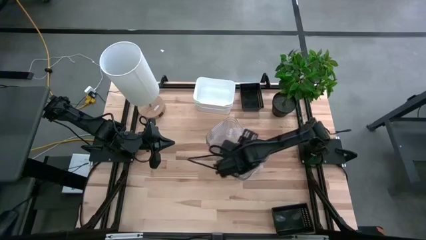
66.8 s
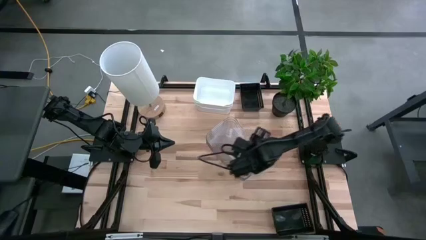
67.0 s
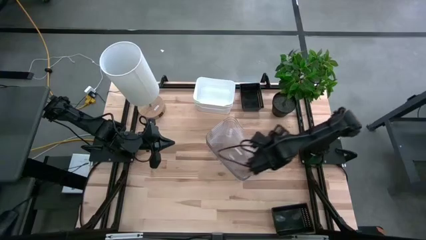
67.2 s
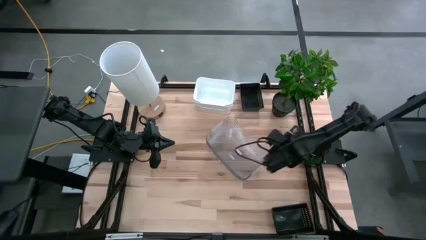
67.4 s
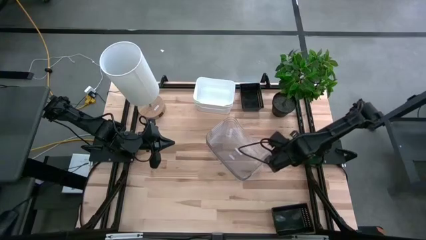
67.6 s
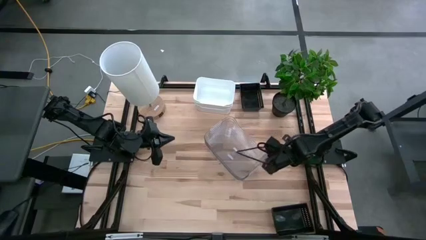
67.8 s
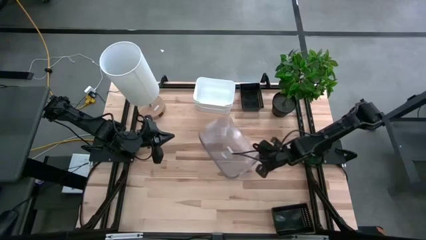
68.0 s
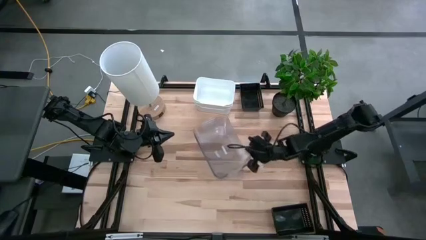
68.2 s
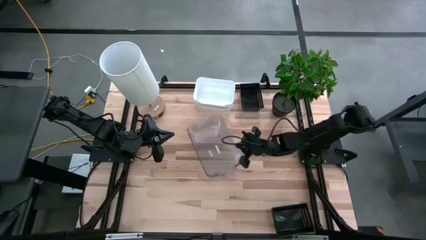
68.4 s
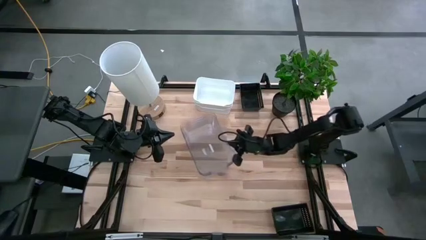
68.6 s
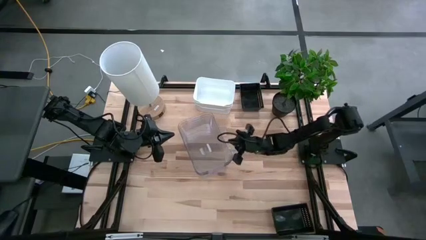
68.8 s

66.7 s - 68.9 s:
Adjust the stacked transparent bins on the table

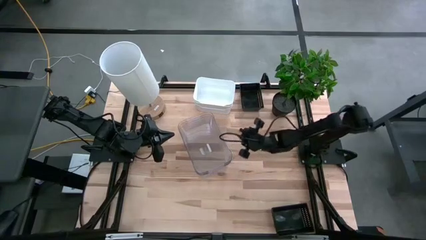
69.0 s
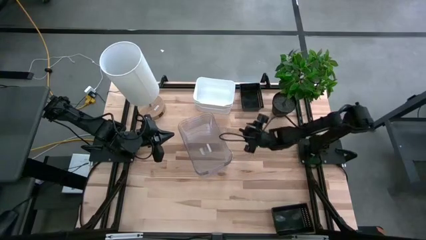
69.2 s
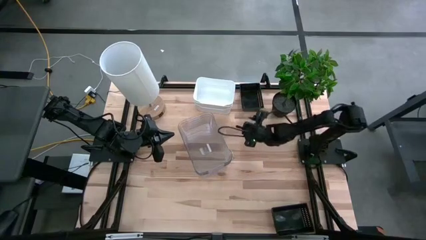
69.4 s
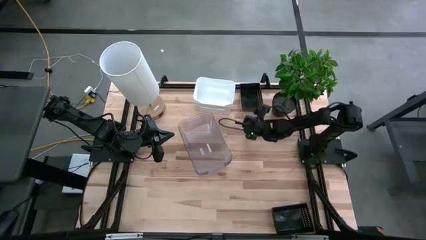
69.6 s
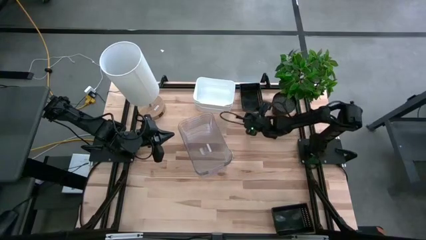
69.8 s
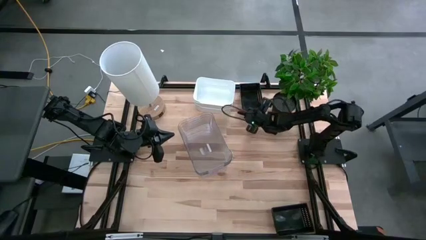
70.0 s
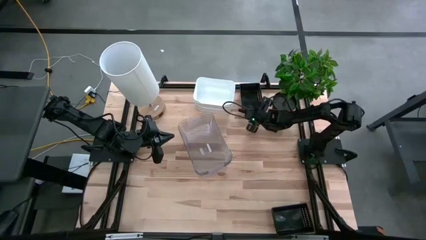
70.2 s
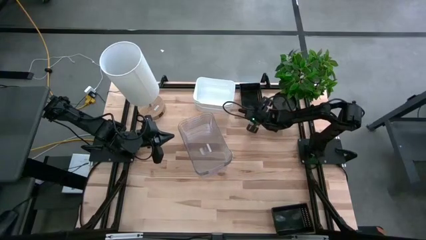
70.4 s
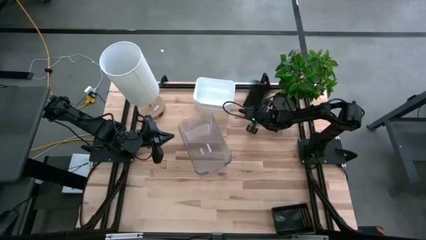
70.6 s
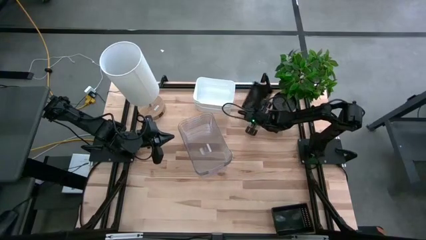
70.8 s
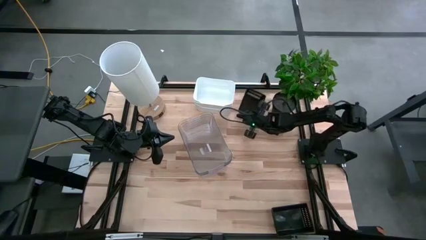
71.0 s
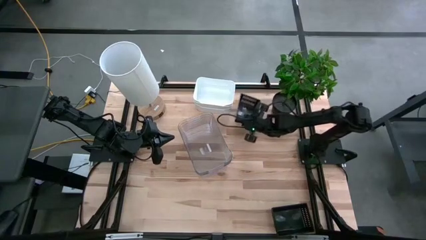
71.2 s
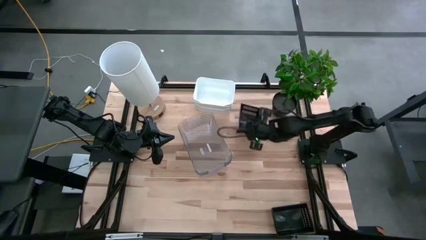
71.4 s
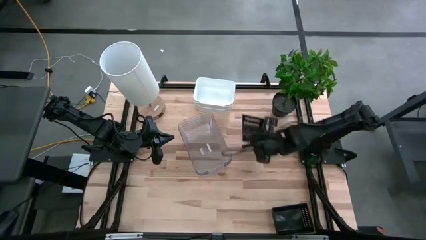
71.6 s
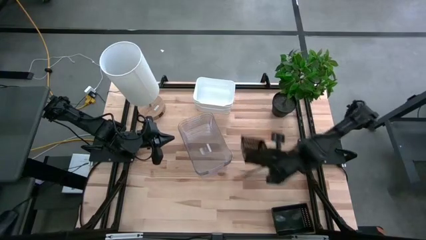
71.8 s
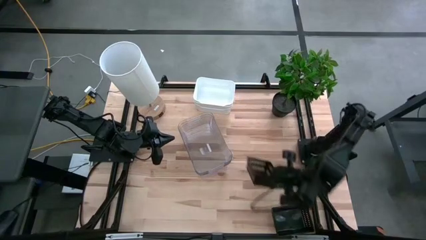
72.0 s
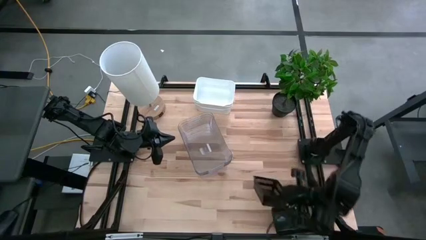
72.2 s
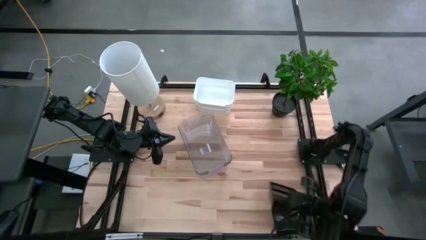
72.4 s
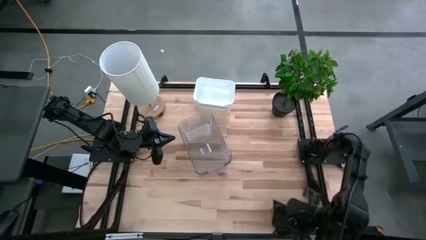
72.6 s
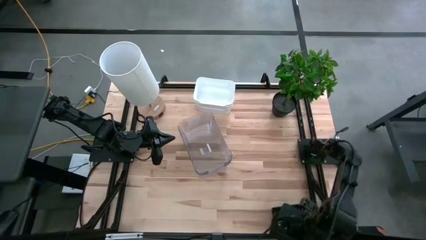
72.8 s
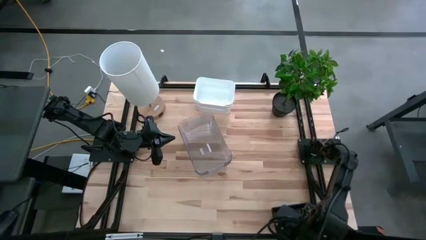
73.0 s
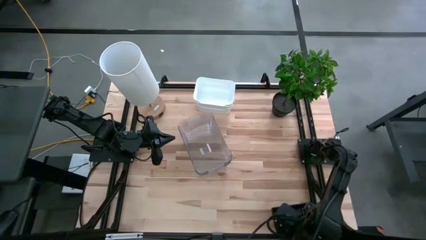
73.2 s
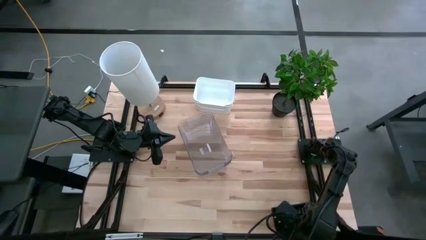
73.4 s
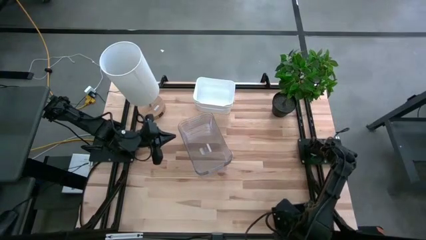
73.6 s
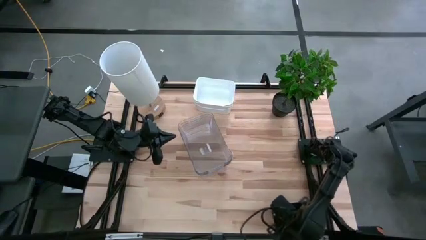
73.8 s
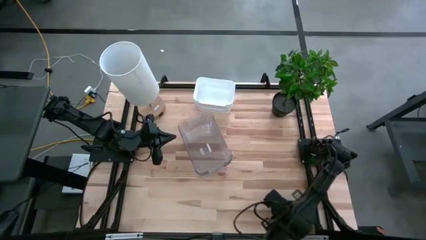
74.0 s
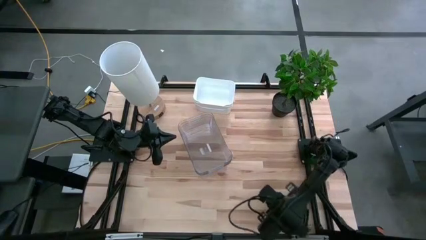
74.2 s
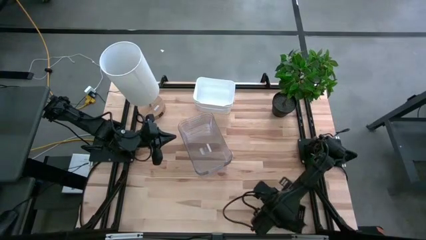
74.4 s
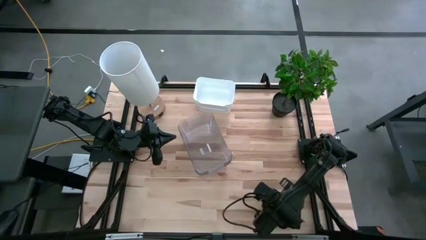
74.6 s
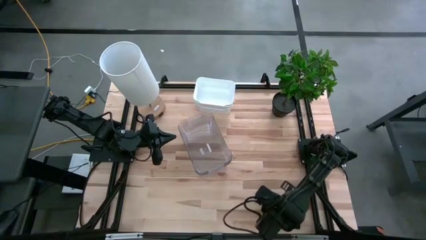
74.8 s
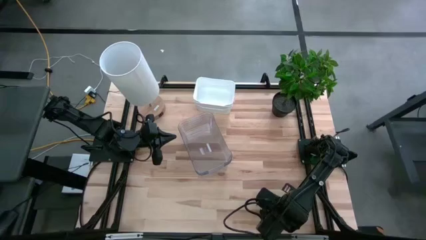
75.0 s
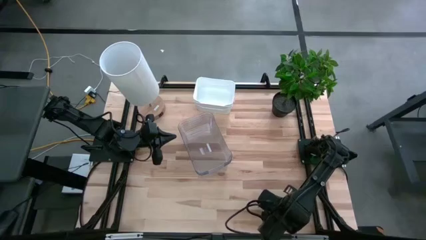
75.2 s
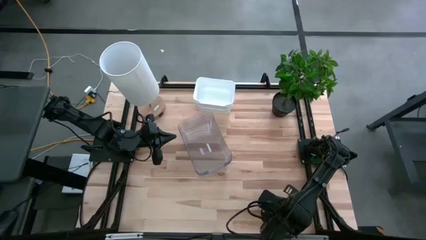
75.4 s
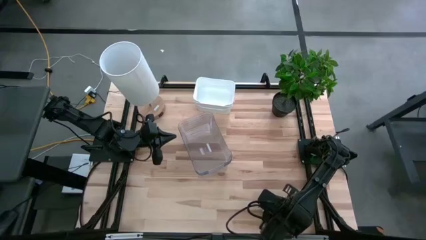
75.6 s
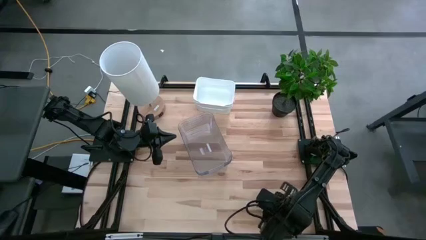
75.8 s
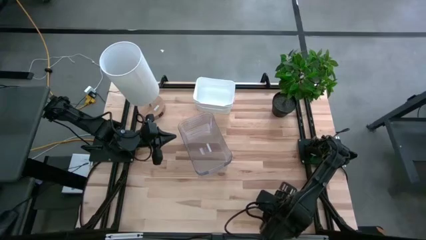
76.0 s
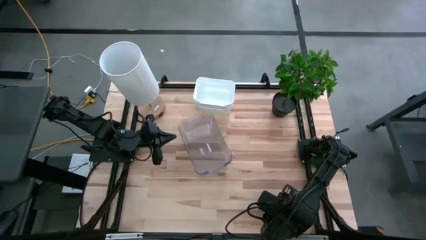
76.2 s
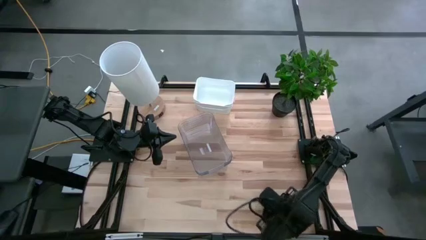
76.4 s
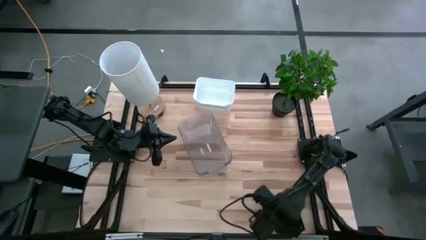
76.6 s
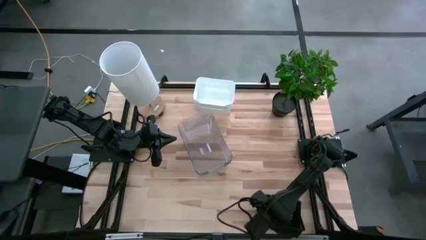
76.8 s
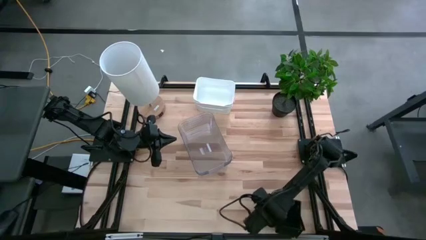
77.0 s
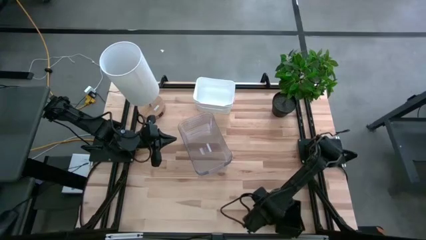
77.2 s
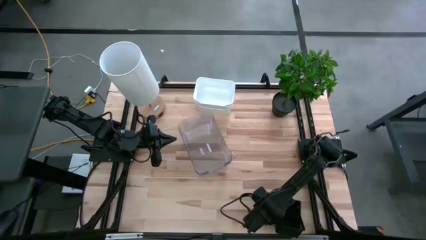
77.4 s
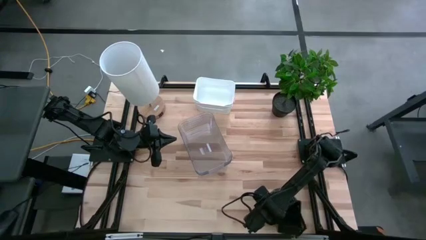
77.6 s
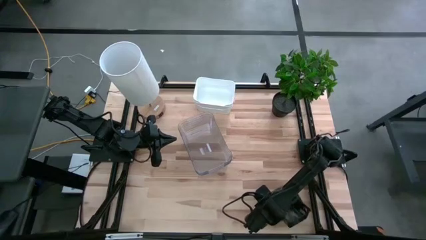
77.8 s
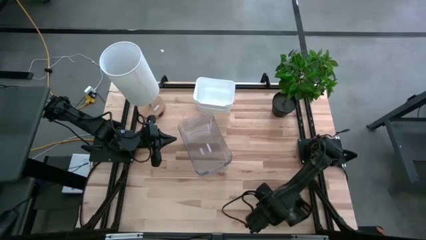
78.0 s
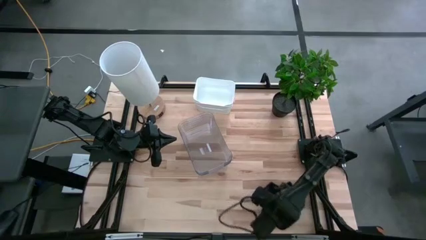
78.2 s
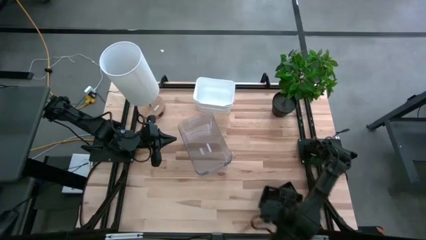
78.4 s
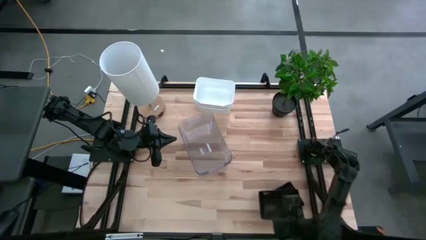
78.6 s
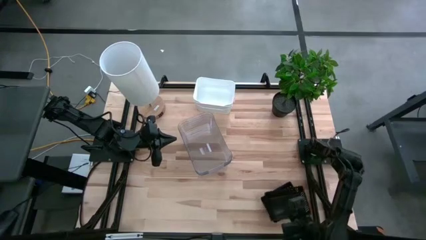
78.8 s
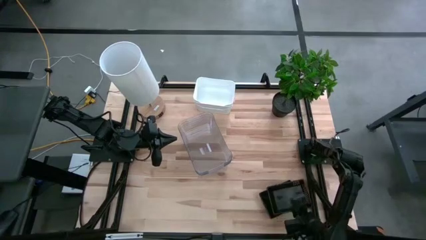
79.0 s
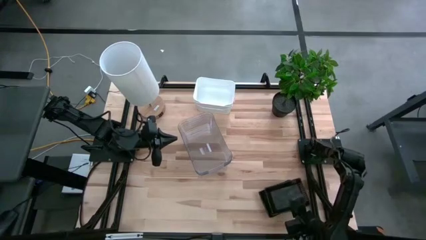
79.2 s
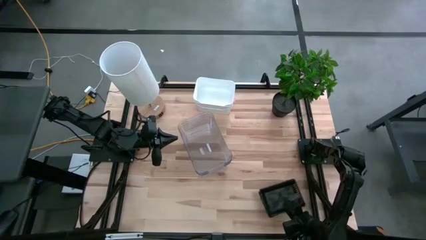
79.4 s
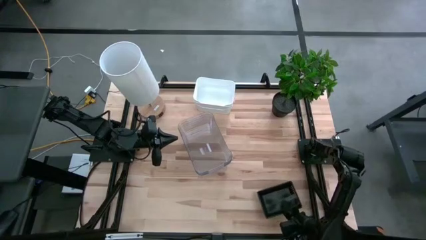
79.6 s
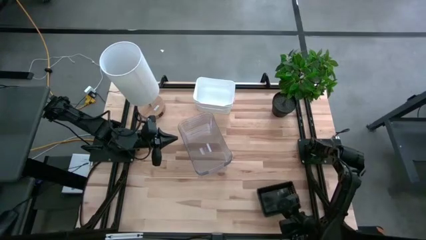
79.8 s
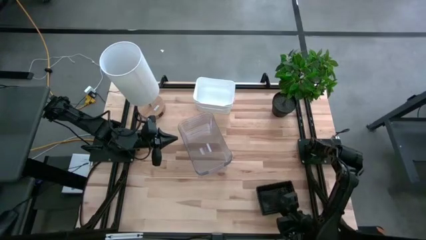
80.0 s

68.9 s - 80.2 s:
Stack the top black bin on top of the bottom black bins
